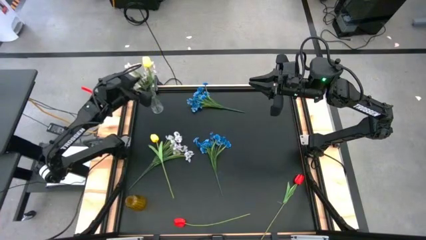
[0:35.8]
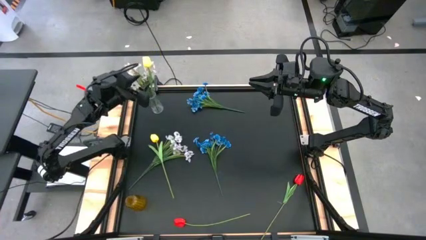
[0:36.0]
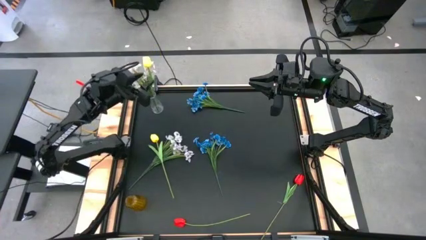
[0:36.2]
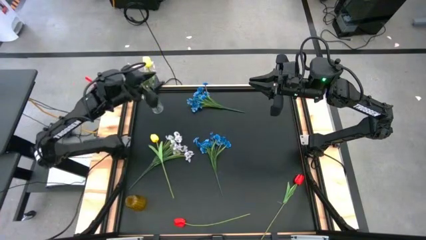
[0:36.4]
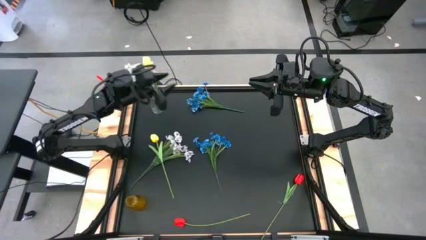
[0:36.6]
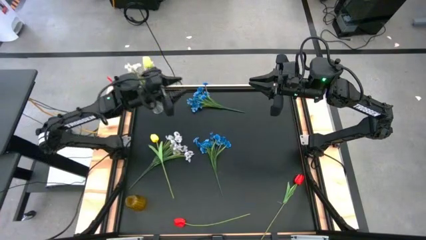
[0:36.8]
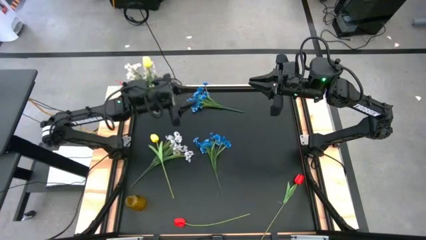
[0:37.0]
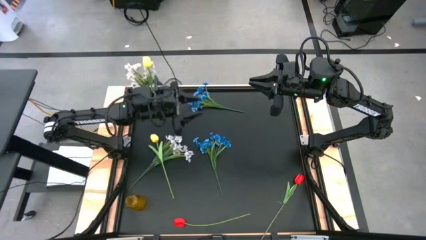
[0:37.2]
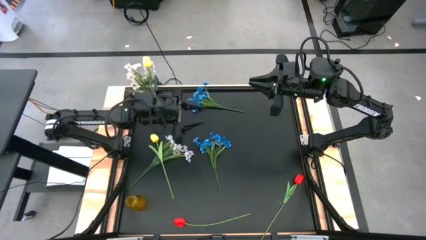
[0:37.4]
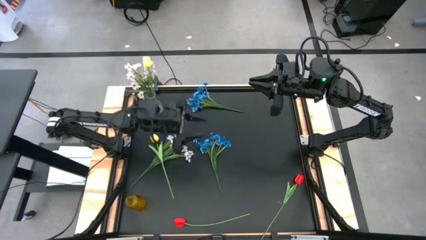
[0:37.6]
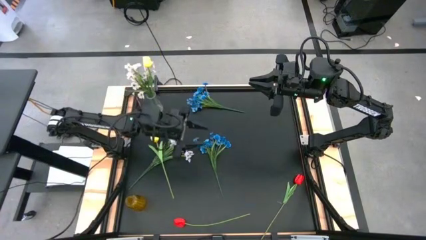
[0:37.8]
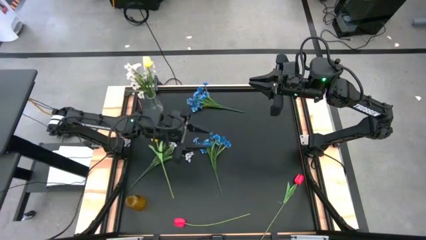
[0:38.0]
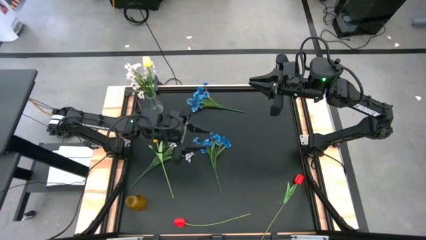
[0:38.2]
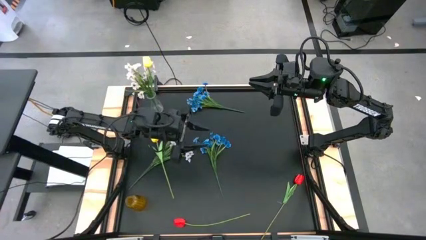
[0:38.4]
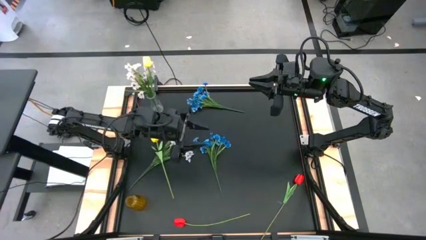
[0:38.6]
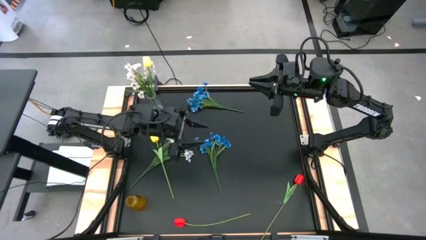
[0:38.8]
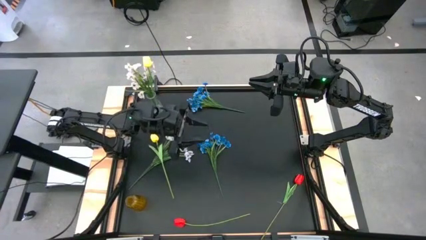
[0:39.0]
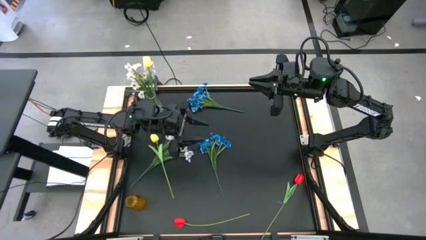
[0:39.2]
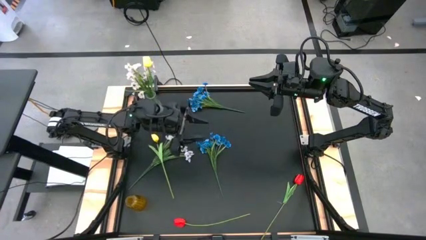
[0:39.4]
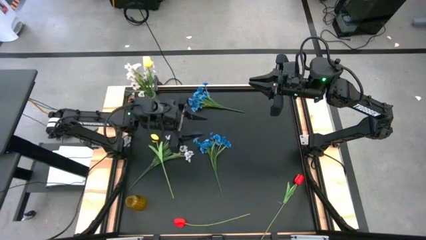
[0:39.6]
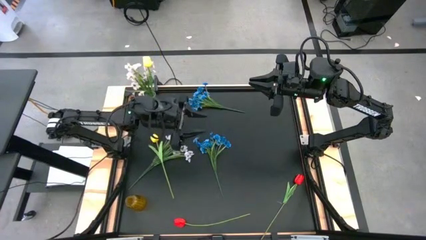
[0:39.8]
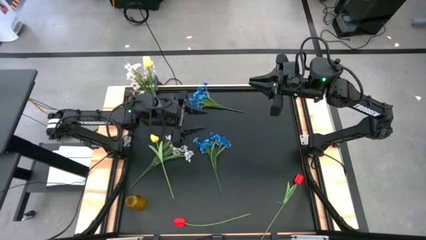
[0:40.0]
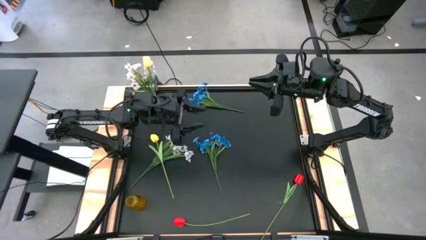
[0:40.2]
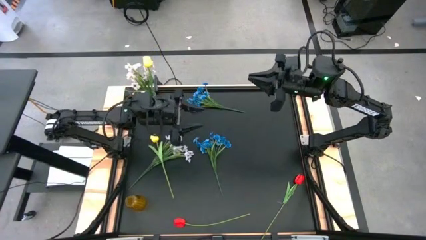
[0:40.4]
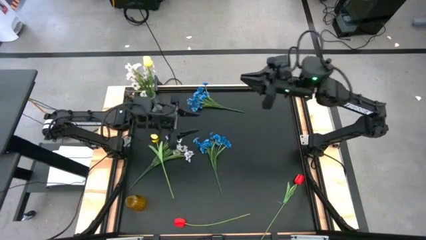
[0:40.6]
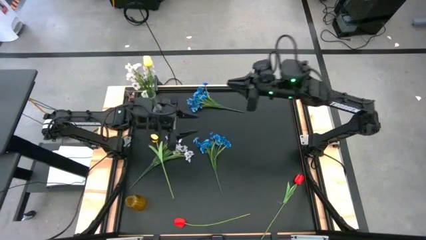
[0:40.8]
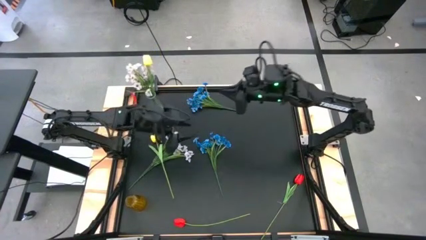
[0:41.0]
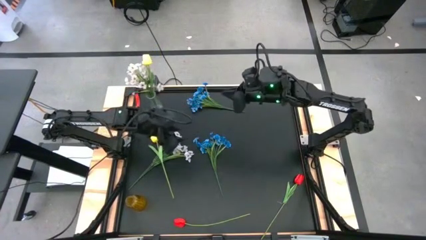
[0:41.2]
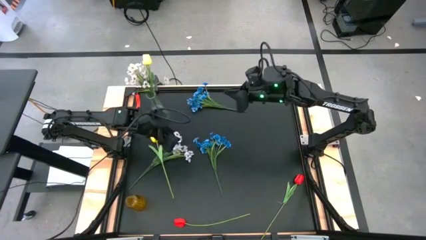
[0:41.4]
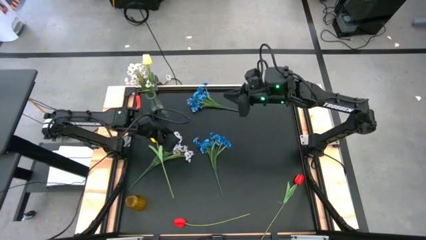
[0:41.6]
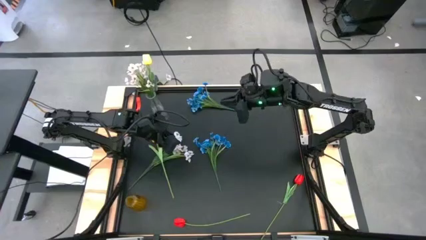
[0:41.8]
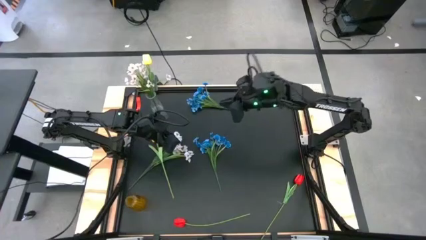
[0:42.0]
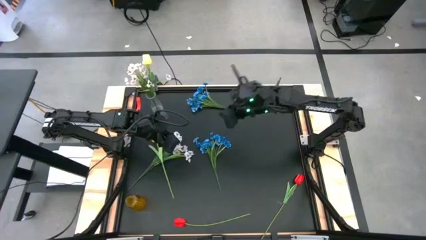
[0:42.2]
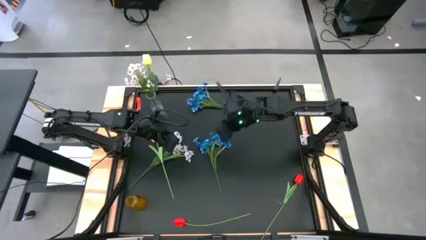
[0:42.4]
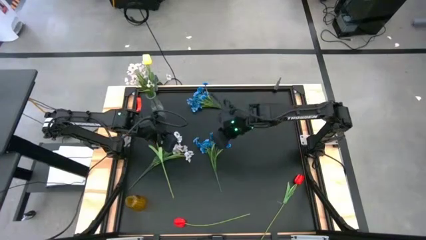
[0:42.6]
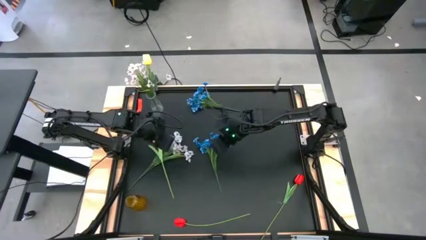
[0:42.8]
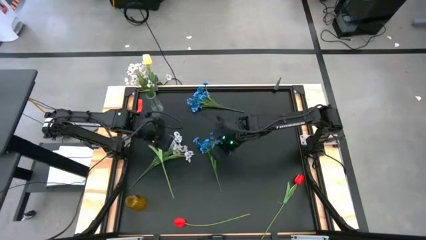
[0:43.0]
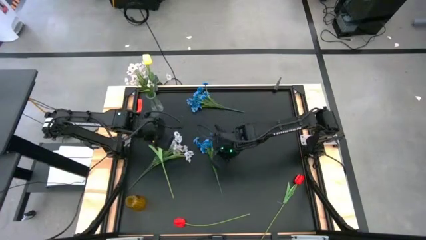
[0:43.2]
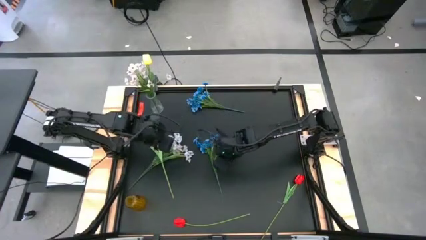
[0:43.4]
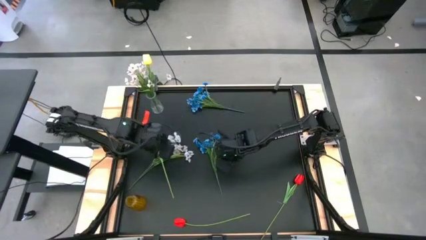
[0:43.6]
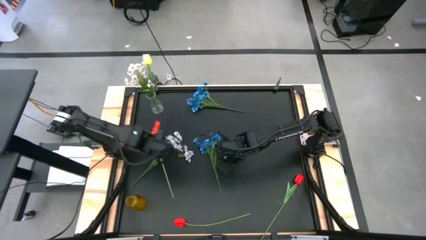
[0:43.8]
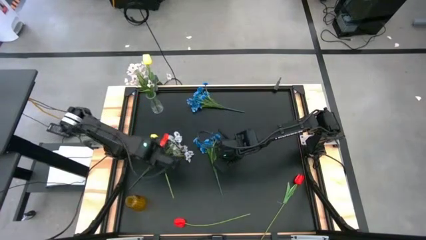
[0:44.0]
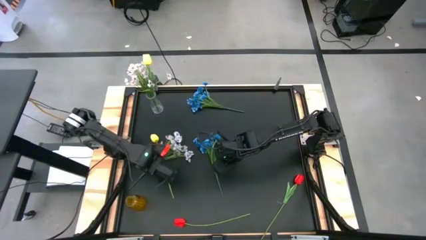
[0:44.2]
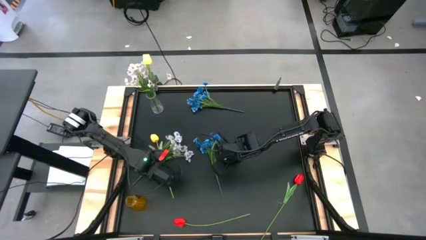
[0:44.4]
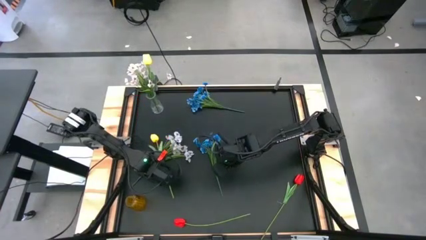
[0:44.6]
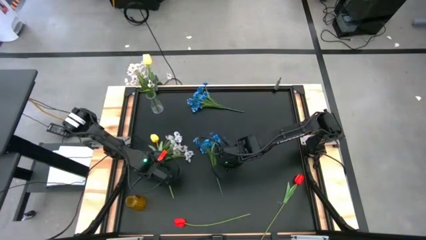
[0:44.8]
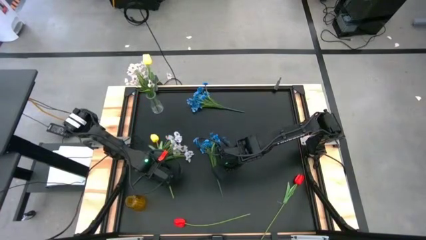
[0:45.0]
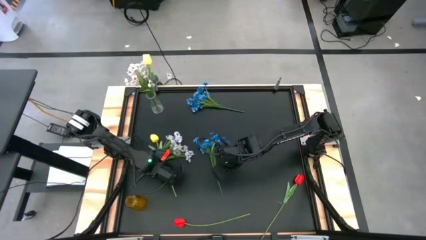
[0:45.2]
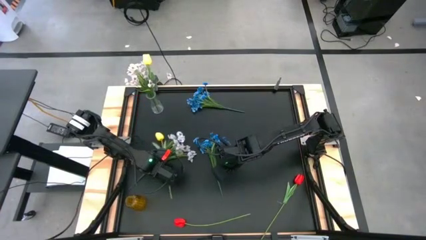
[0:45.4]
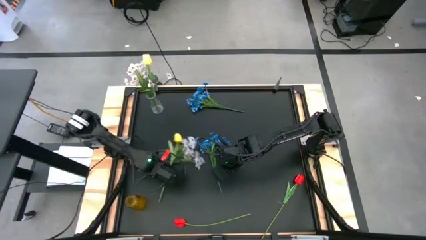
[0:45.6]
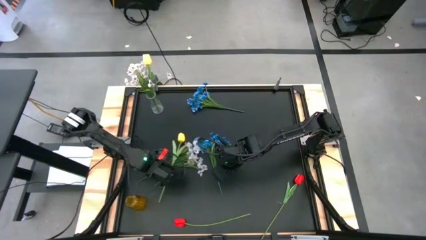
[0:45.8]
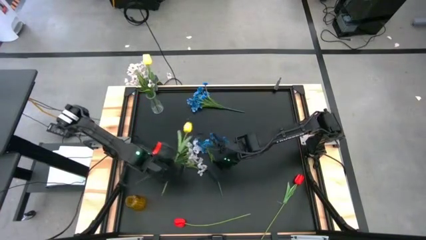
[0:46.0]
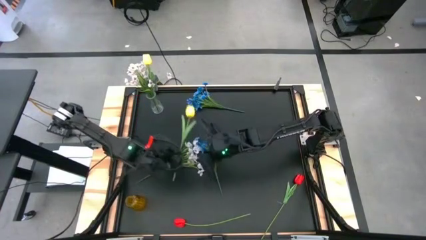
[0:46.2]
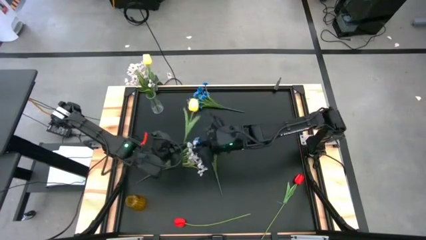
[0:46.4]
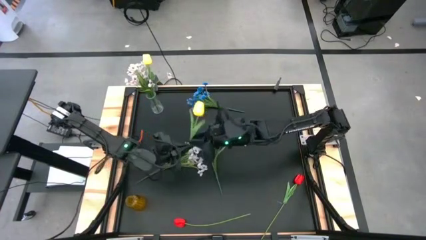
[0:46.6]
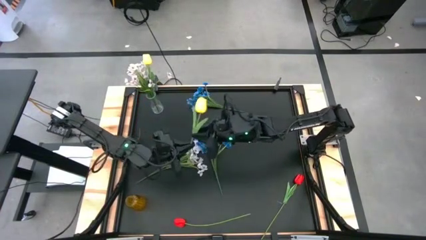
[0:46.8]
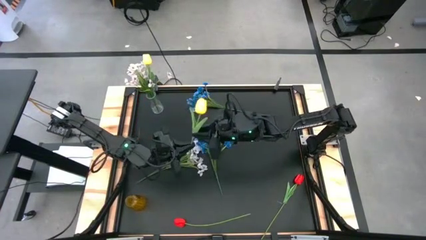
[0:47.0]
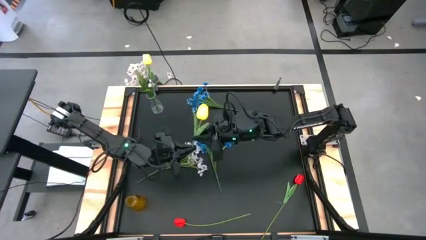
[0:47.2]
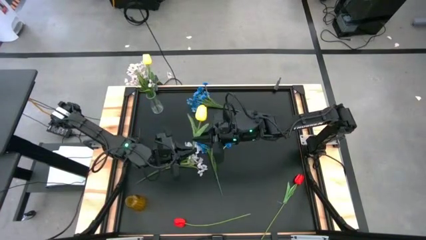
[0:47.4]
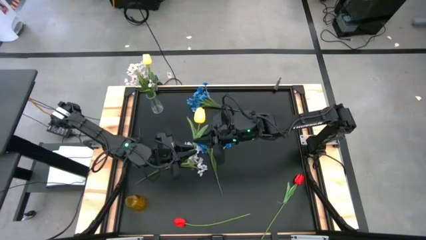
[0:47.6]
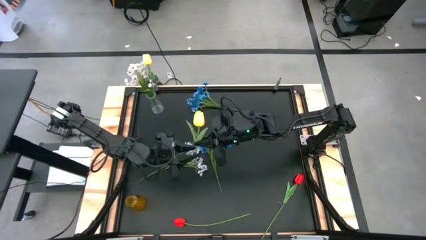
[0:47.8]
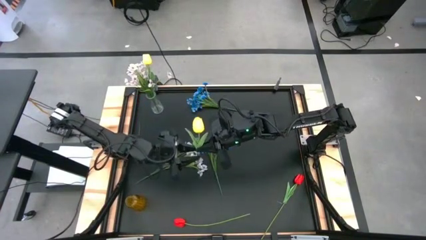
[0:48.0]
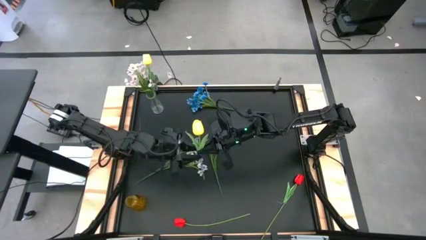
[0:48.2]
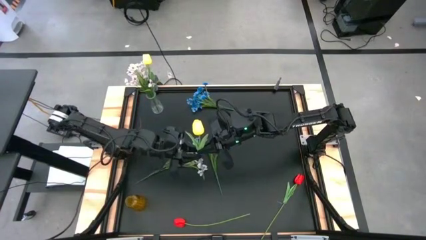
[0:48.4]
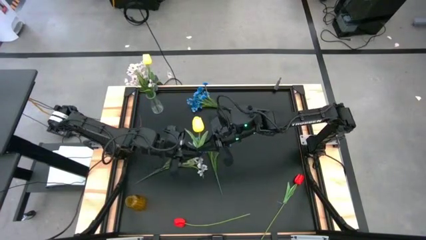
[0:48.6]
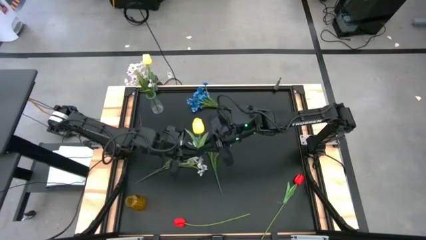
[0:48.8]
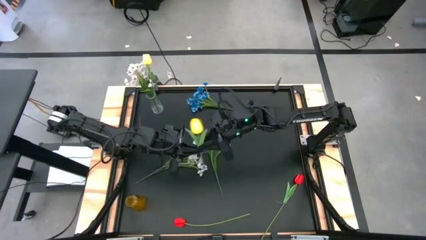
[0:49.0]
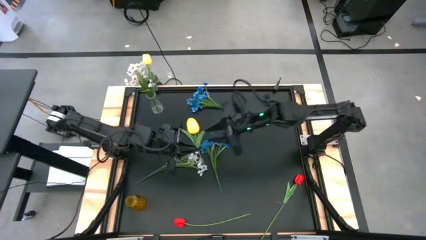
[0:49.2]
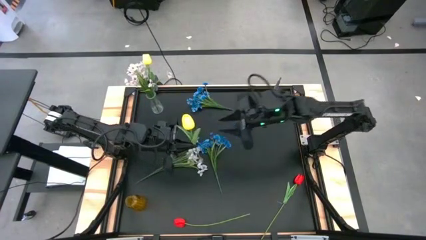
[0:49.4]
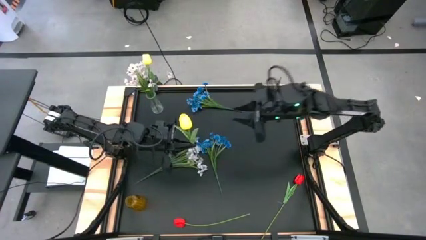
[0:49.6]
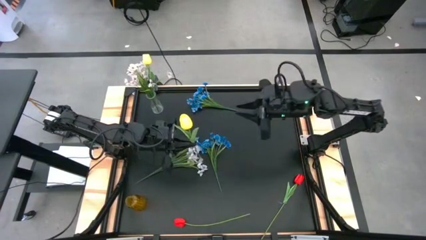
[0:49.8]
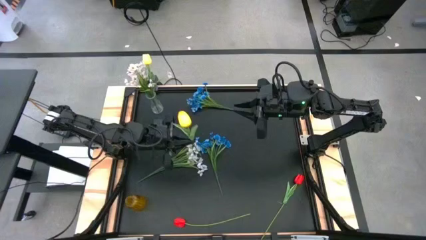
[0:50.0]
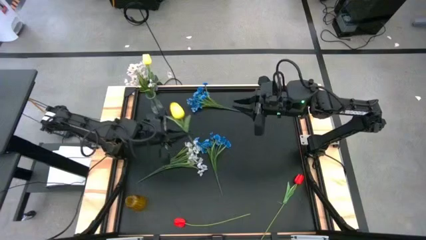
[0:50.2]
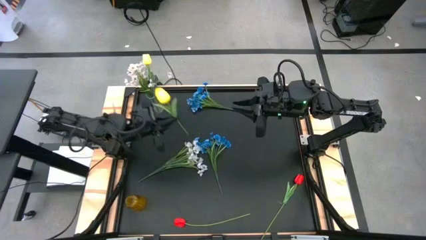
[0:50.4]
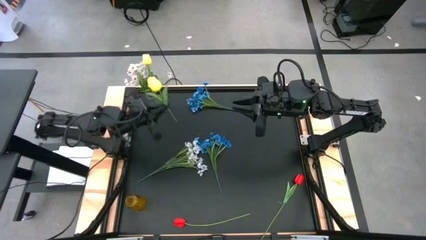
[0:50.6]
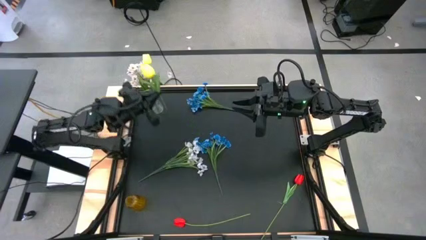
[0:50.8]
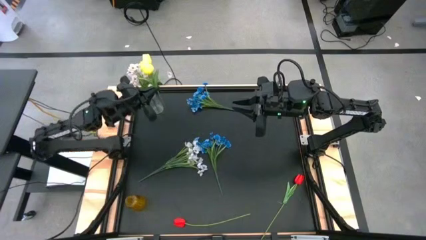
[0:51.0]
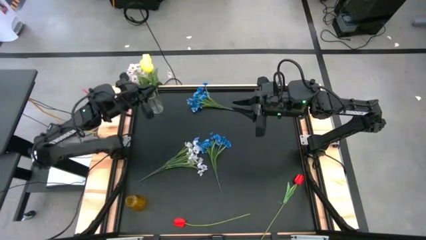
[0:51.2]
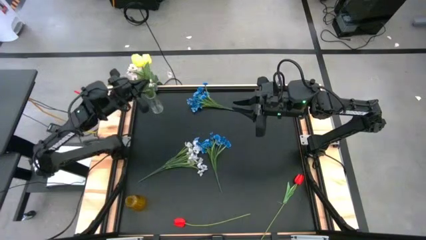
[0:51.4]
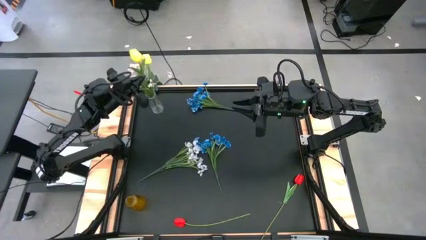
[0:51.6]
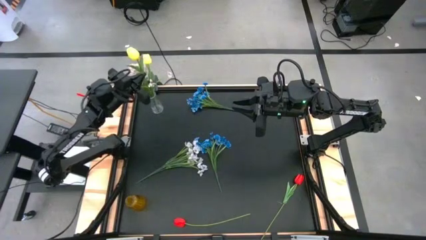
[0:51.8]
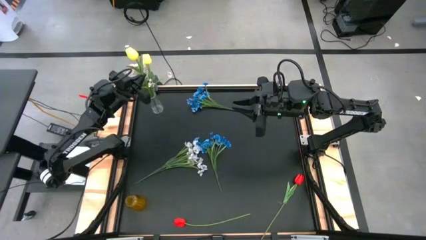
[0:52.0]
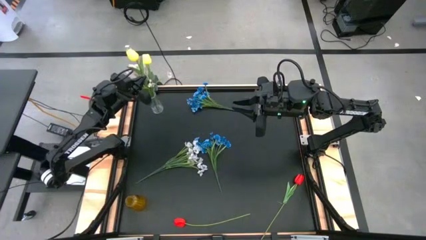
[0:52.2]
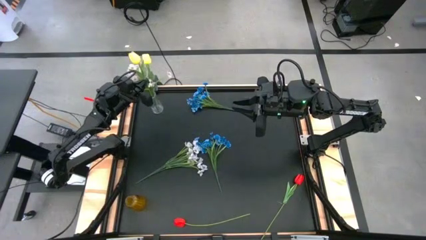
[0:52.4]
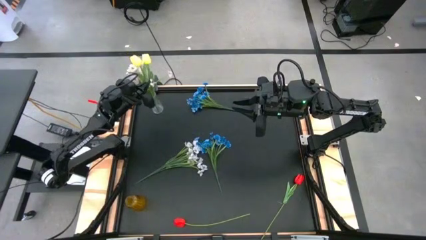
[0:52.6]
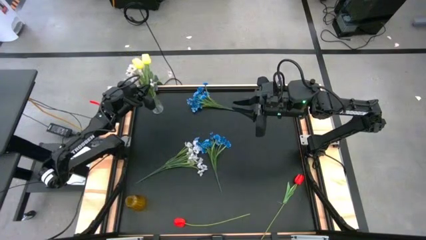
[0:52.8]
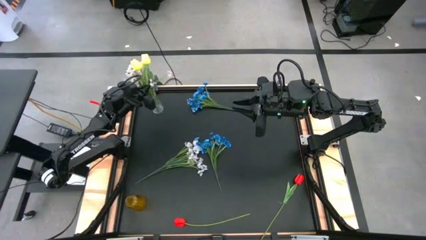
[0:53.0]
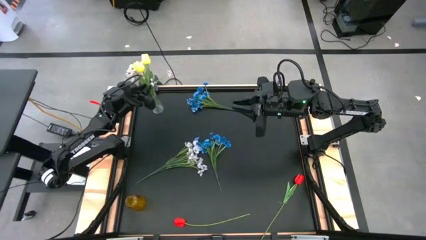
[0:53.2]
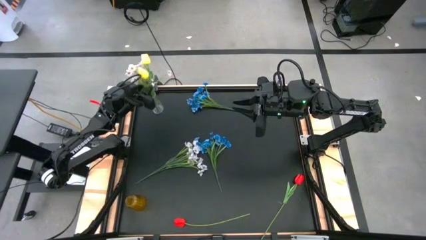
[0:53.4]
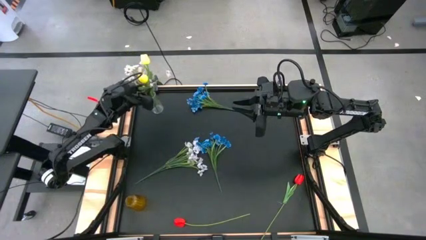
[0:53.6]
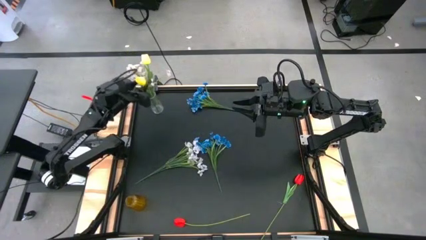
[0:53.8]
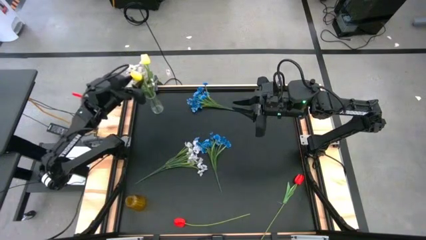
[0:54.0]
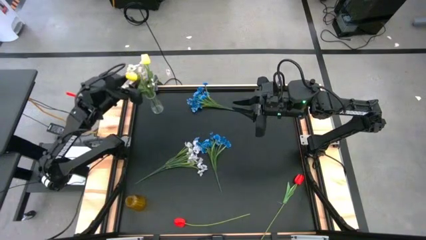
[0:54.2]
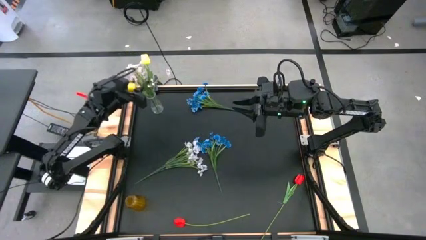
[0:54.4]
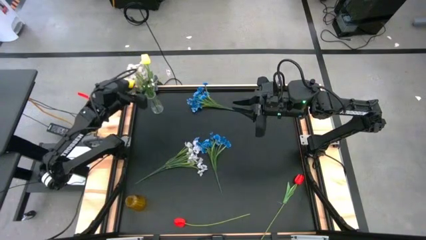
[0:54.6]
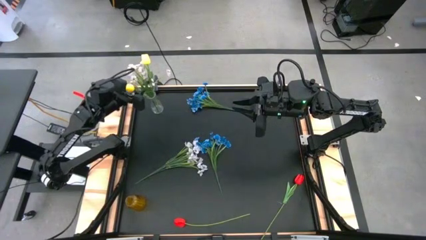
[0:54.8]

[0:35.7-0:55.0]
Task: Sort flowers into vase by color
Put the yellow flower into the transparent vase
